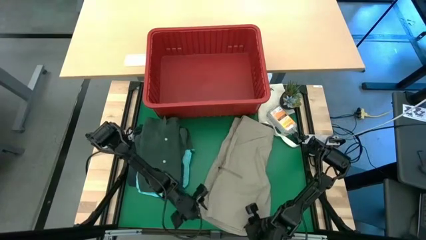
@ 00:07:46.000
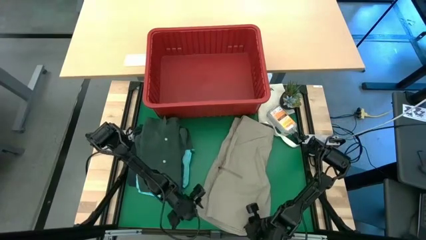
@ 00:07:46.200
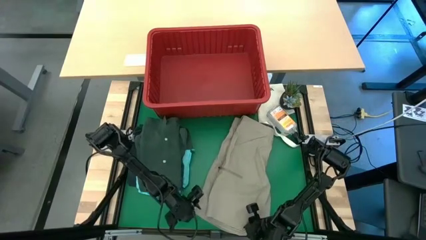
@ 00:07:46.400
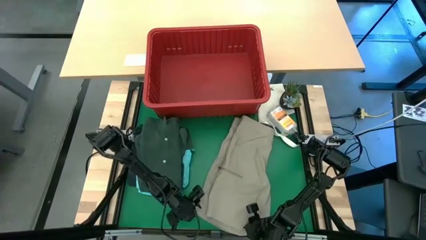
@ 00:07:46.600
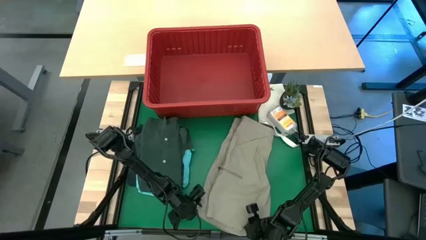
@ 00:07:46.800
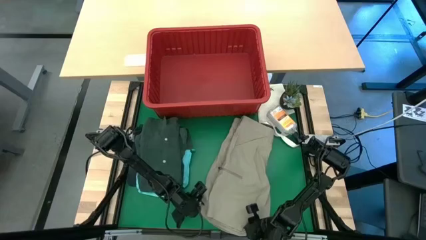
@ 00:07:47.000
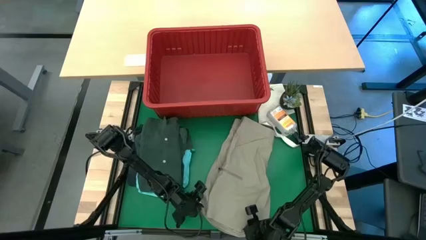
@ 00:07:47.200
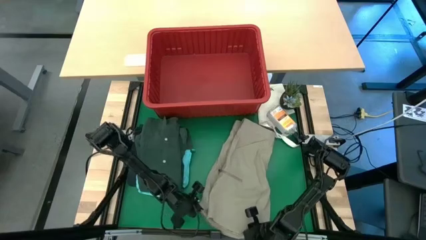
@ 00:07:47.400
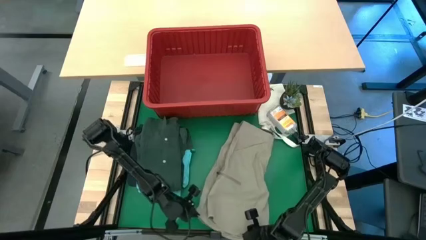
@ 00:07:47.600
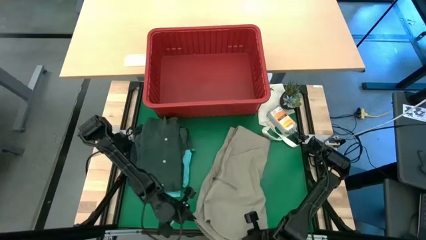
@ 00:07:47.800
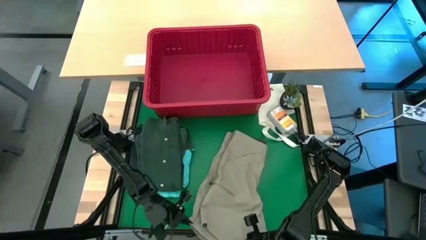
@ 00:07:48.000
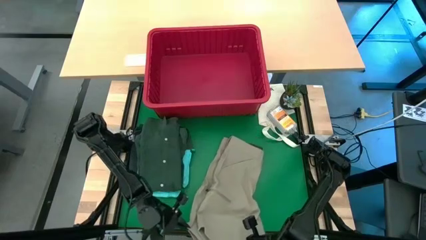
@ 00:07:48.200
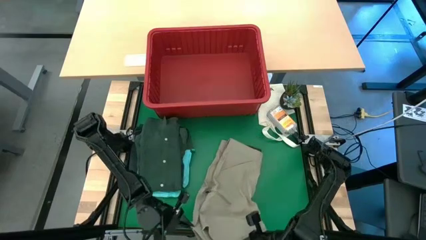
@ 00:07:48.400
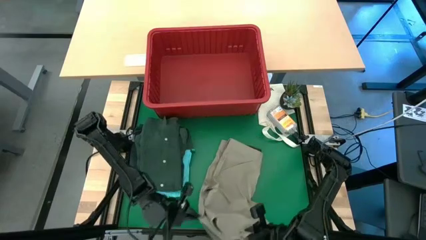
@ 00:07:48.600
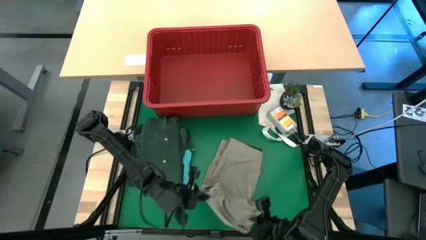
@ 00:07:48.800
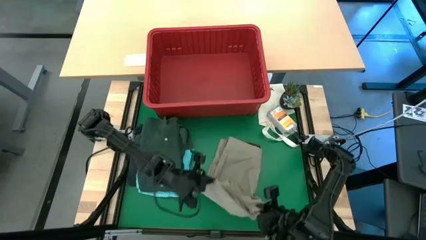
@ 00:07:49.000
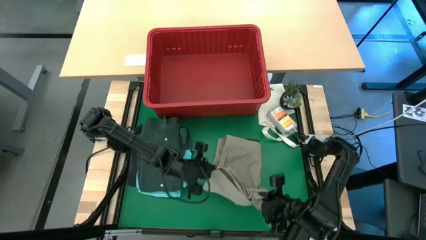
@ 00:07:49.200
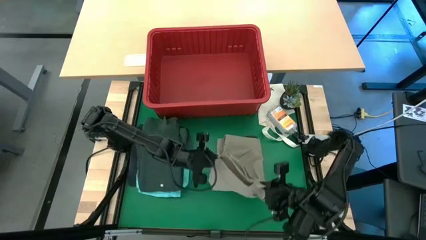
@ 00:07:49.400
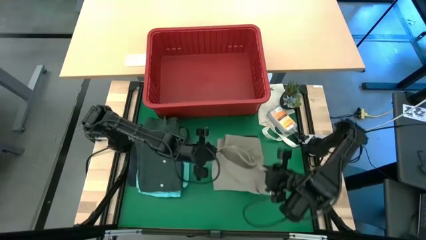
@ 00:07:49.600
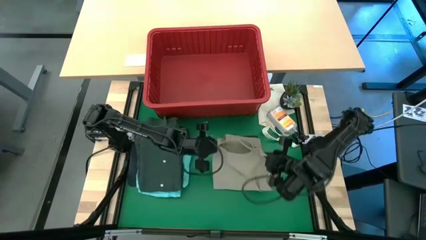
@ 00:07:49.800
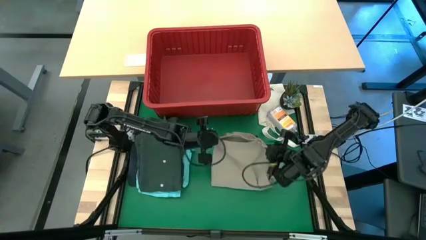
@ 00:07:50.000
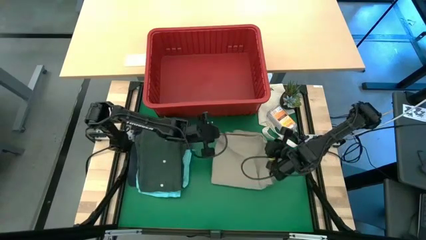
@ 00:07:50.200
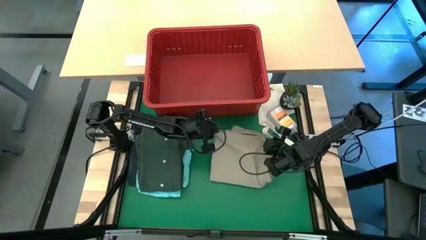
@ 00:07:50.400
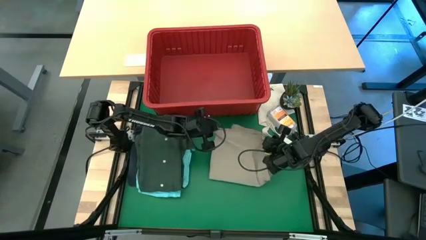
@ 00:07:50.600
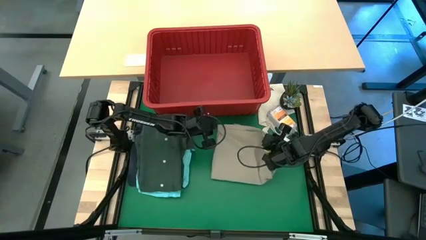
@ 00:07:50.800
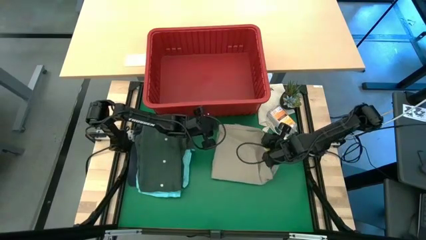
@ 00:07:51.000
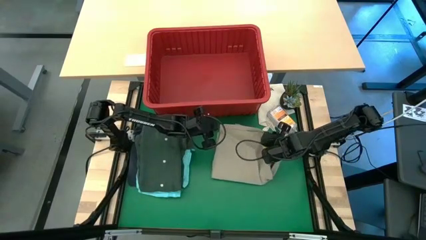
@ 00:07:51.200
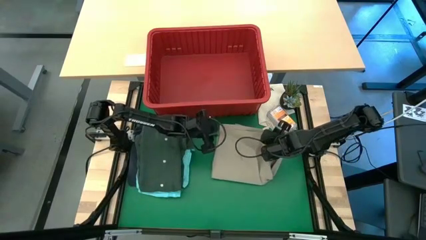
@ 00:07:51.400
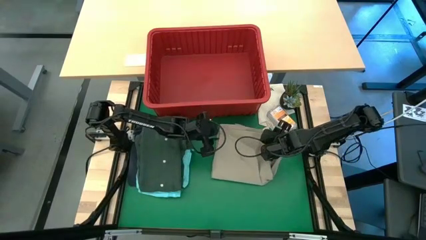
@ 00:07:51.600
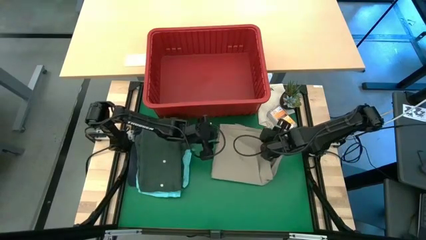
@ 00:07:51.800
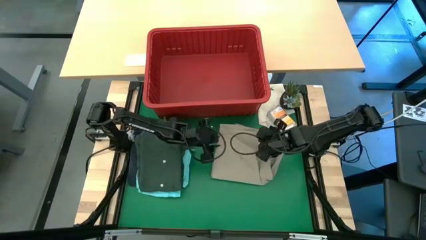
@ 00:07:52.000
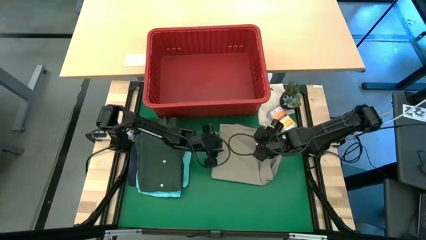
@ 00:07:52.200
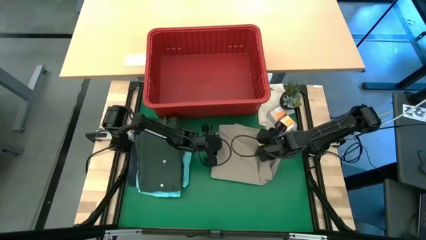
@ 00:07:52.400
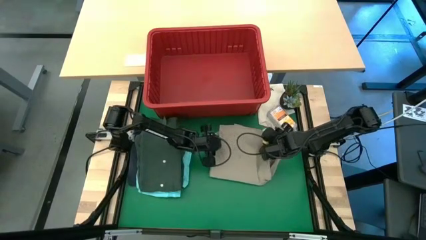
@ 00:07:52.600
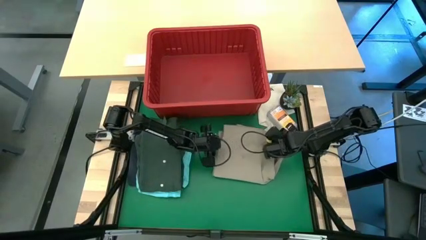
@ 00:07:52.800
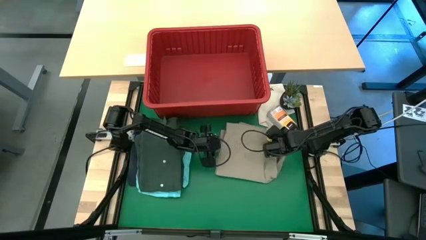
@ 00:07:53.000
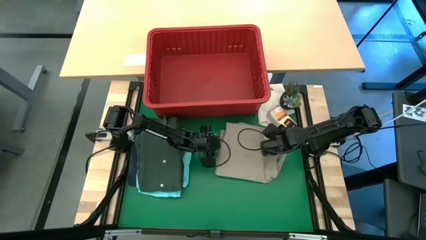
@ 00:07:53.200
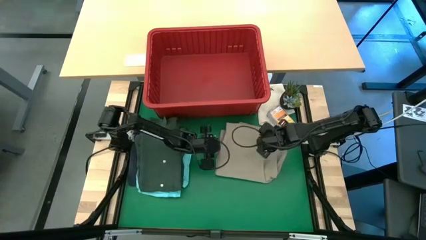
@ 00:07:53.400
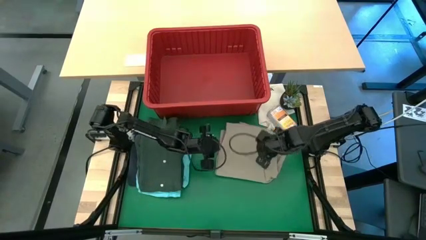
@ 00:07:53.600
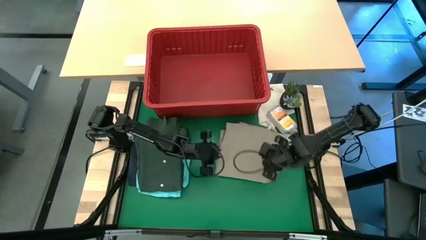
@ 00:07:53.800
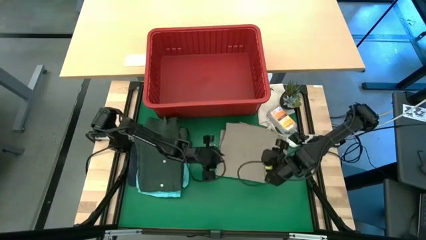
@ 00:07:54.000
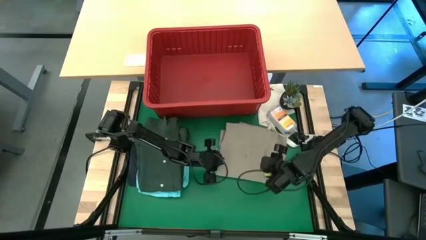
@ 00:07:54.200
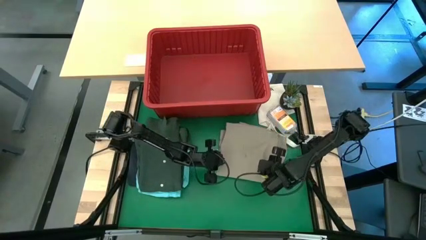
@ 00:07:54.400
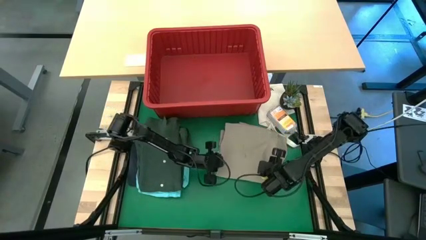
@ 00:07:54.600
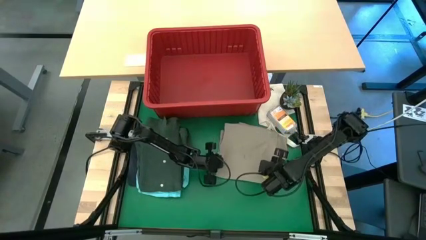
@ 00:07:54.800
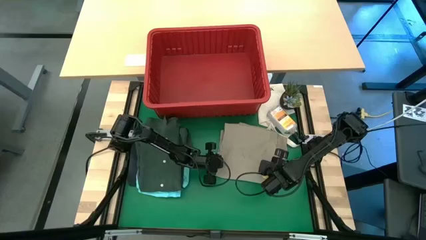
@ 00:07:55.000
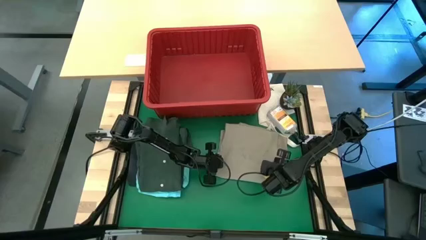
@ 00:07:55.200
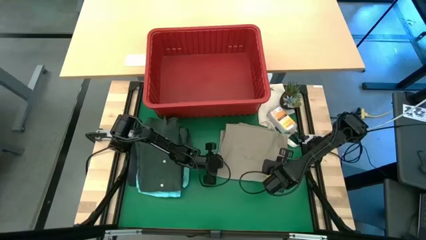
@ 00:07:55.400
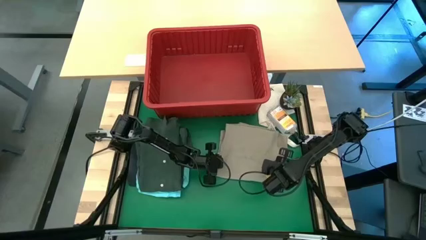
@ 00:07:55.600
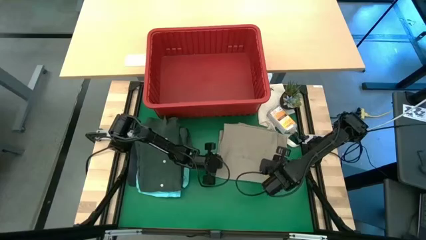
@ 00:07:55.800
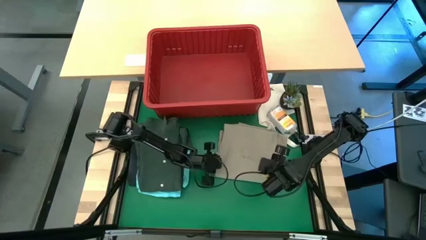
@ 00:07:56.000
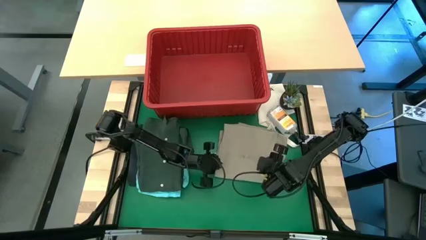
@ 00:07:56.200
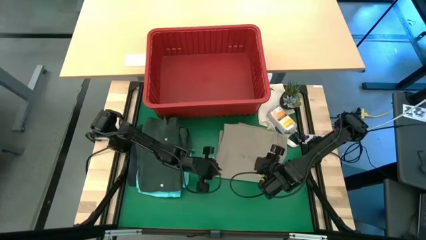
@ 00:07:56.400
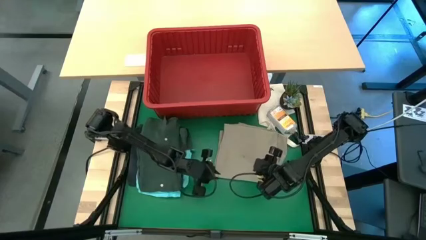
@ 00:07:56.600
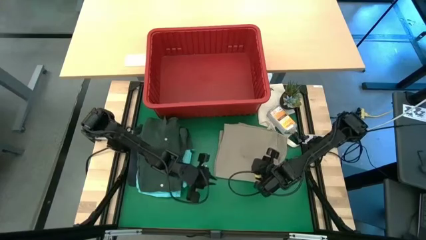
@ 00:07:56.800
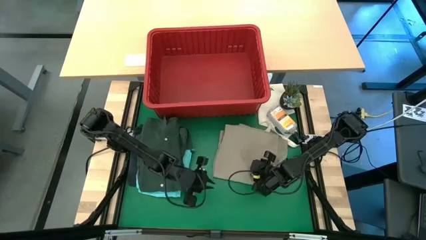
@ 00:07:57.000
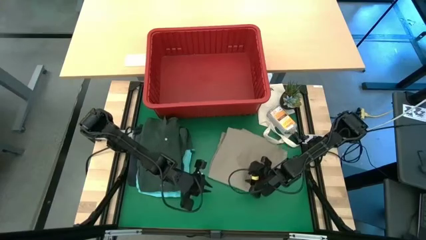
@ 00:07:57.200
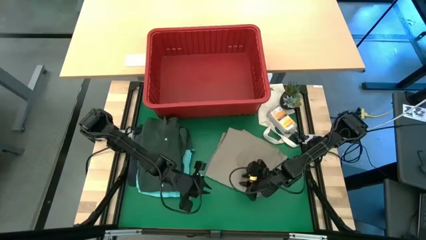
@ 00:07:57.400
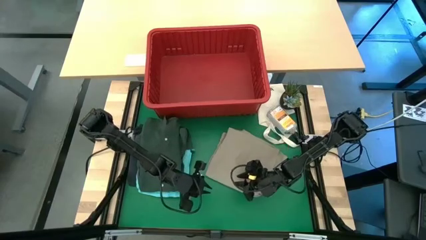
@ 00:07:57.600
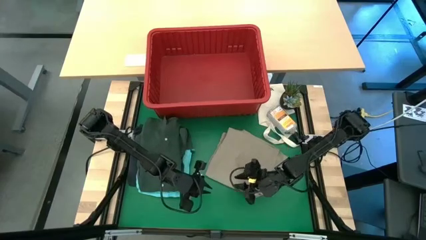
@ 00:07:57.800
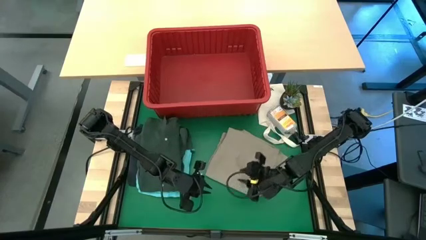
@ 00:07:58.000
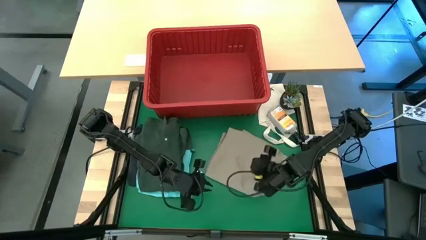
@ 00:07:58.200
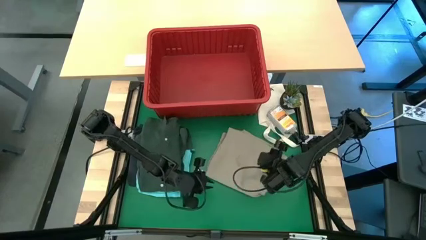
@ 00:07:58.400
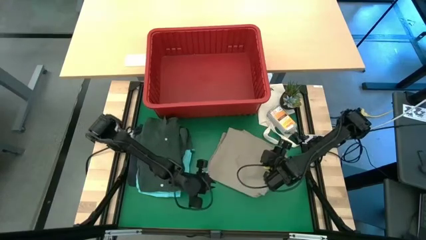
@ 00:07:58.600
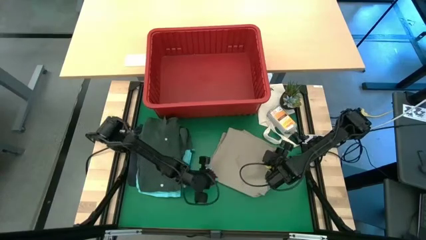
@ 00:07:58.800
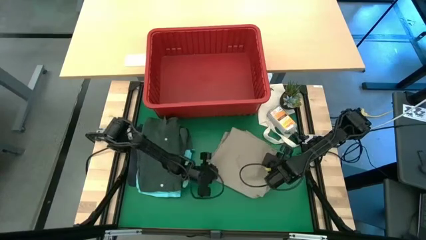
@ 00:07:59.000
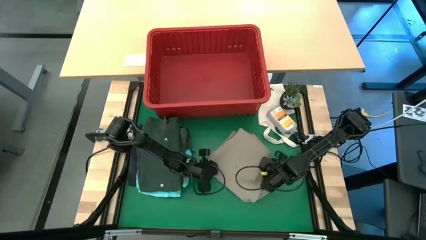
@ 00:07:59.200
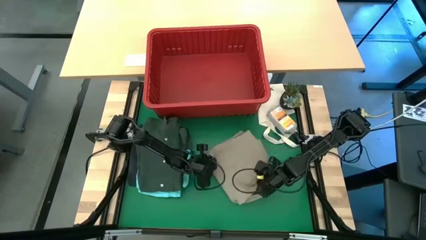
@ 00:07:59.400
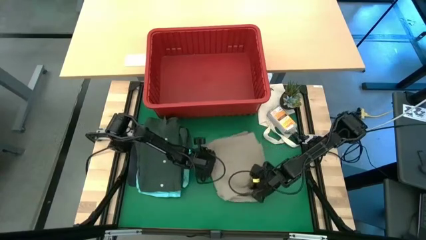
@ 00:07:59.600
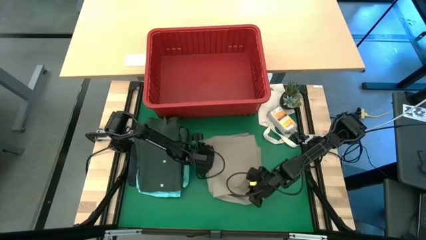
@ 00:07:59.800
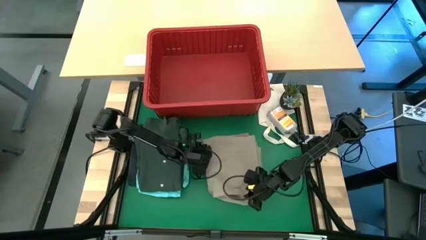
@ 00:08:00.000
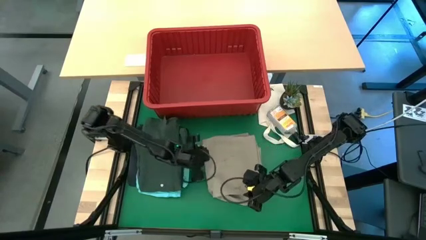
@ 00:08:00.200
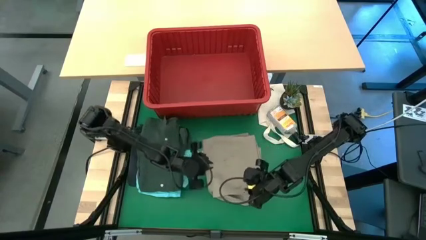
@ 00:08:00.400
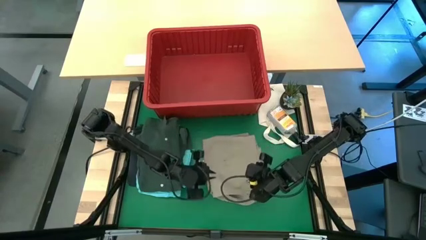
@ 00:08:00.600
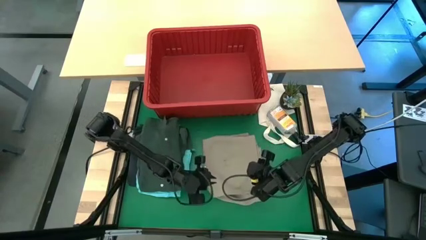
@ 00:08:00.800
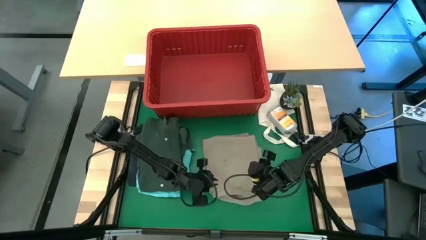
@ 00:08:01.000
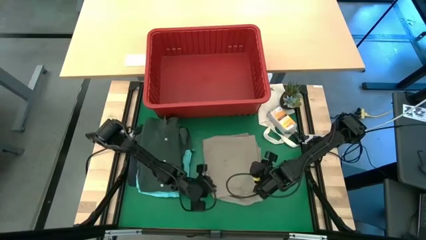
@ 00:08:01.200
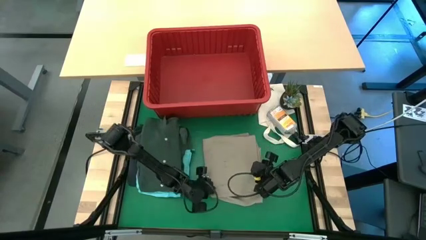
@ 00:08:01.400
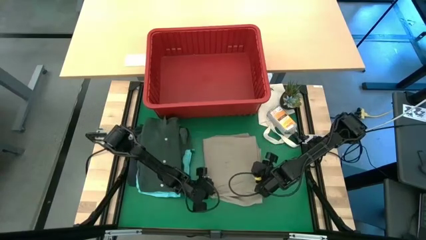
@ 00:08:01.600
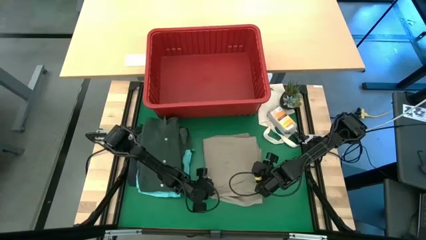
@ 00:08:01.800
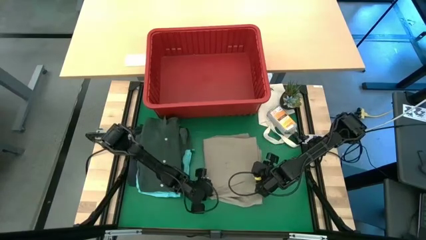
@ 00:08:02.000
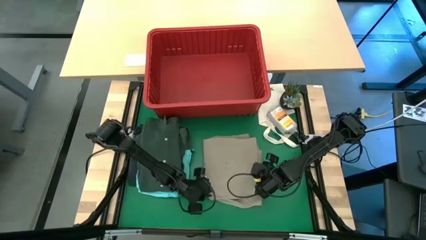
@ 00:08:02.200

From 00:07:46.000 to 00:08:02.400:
Task: Fold Laundry from Bin
Fold the brown shorts from the red laundry bin
